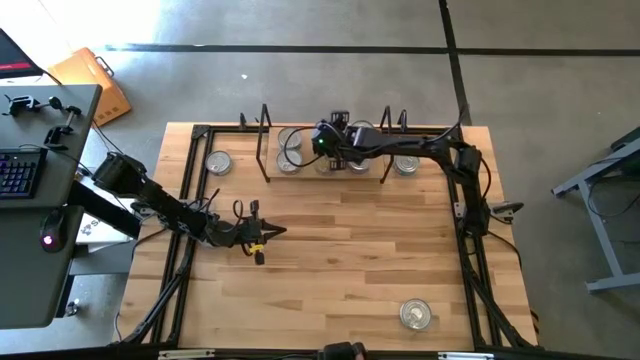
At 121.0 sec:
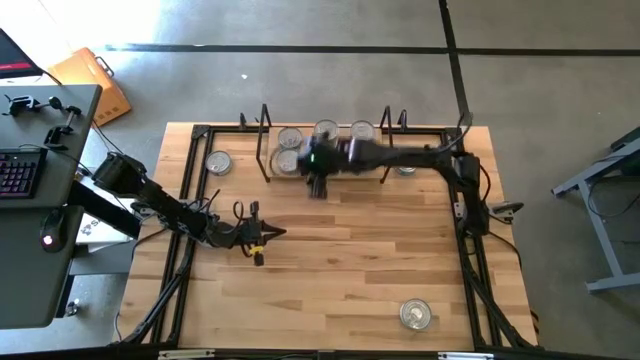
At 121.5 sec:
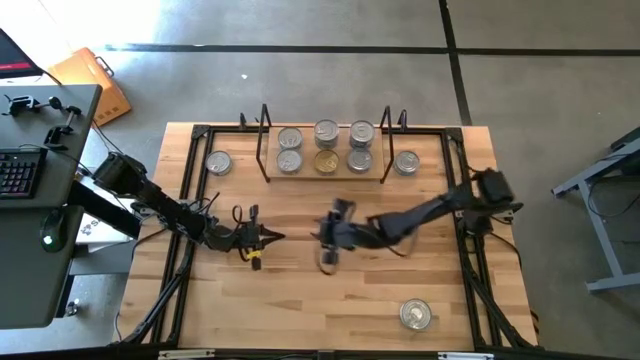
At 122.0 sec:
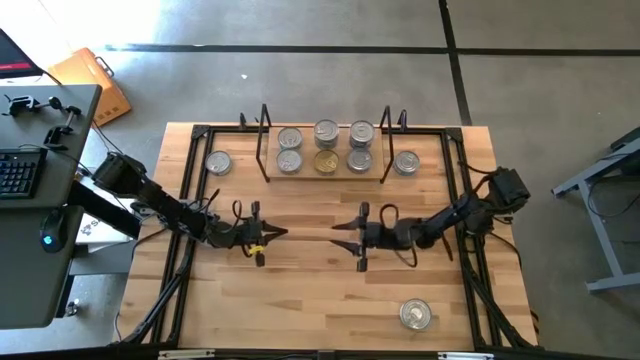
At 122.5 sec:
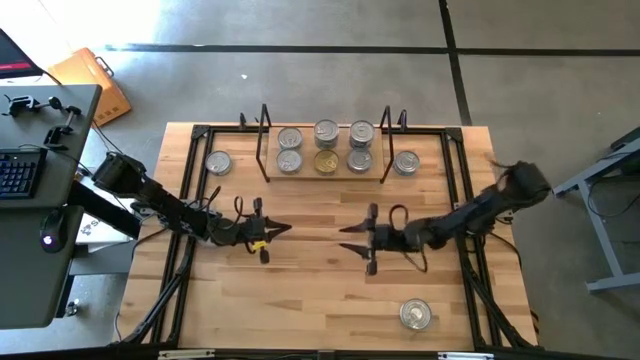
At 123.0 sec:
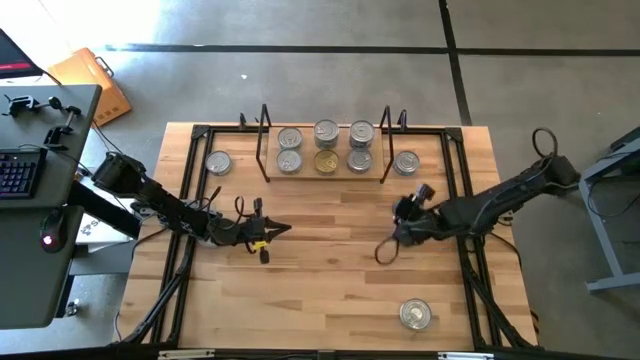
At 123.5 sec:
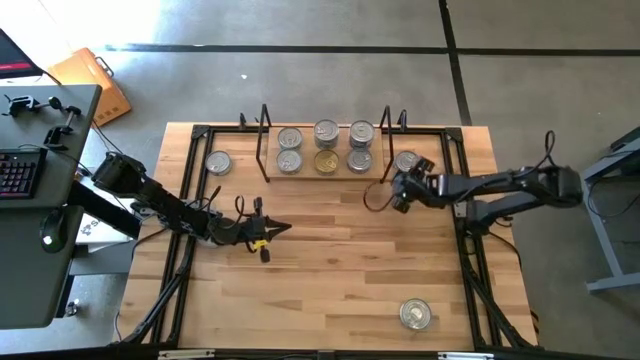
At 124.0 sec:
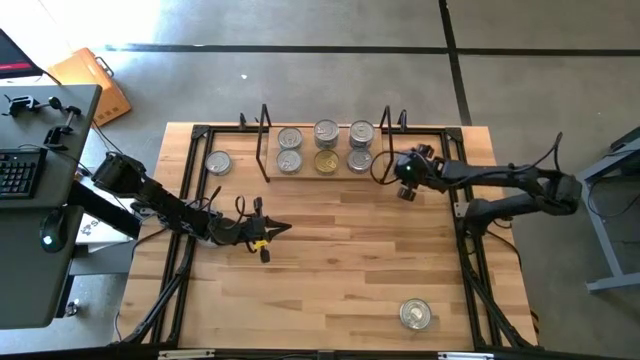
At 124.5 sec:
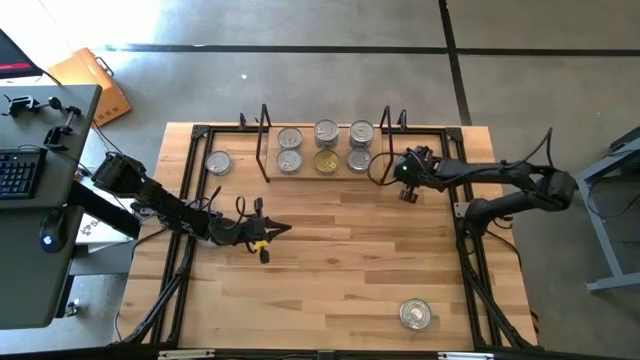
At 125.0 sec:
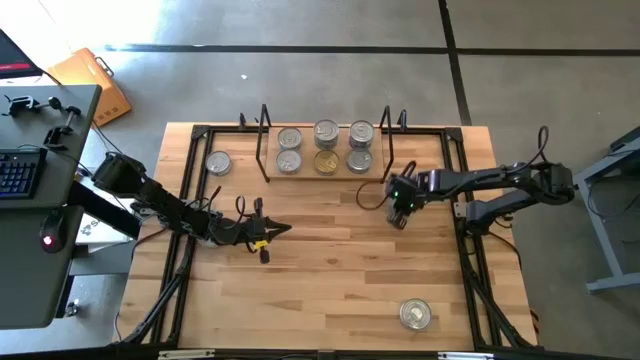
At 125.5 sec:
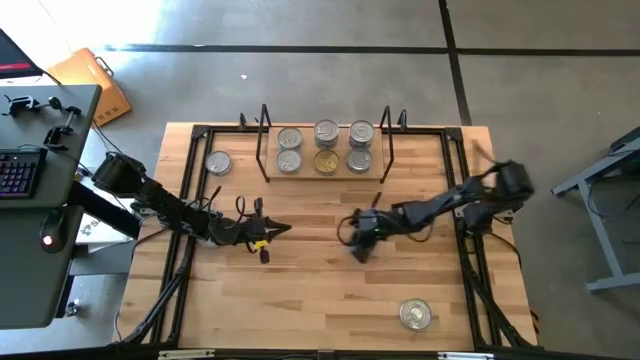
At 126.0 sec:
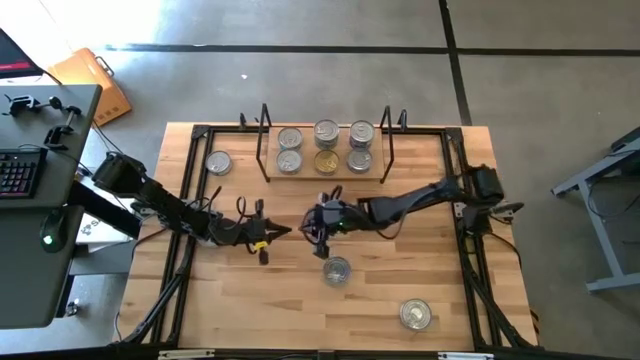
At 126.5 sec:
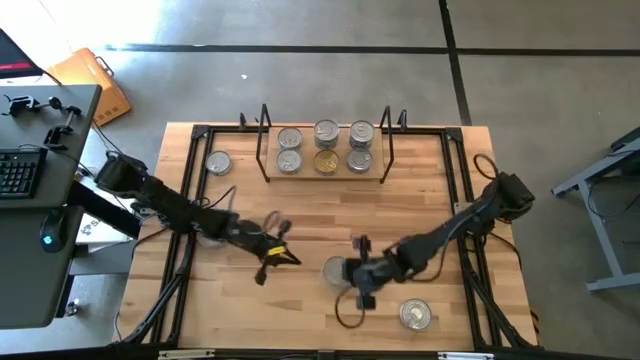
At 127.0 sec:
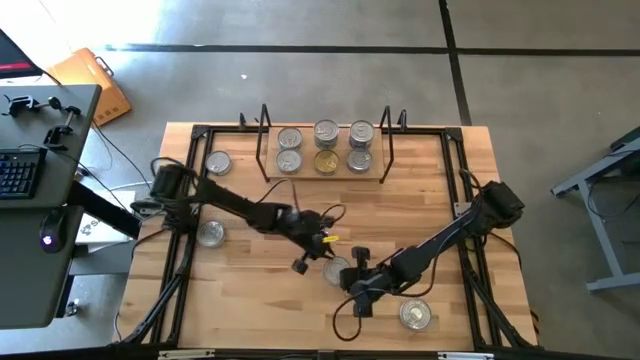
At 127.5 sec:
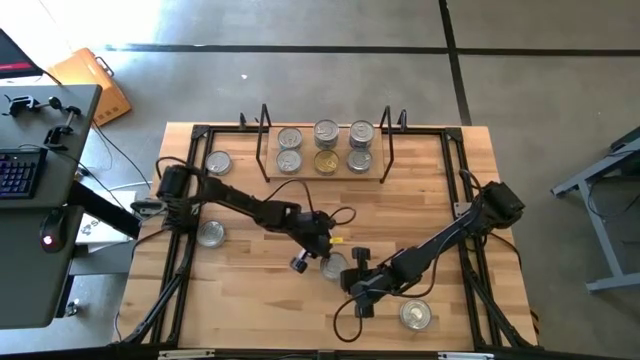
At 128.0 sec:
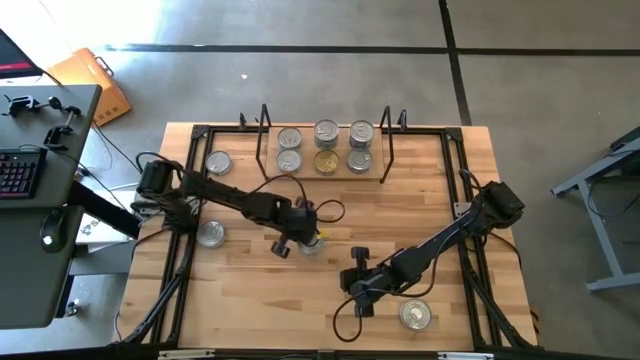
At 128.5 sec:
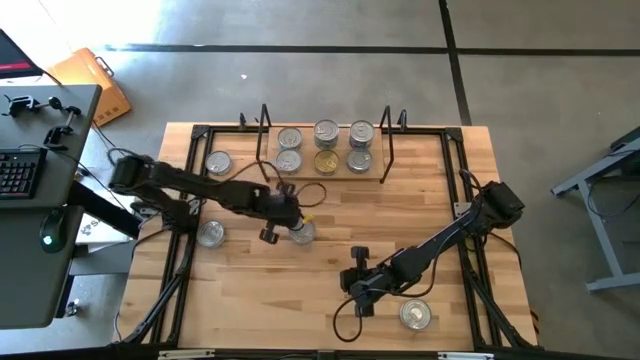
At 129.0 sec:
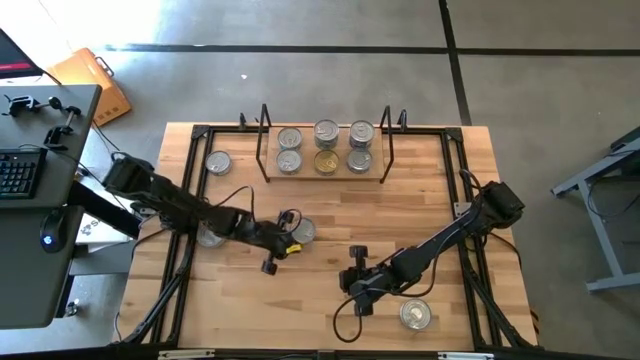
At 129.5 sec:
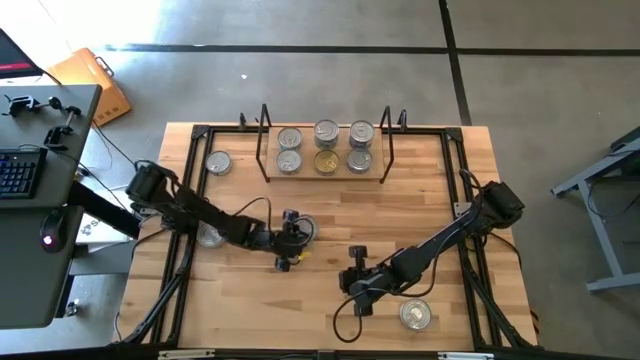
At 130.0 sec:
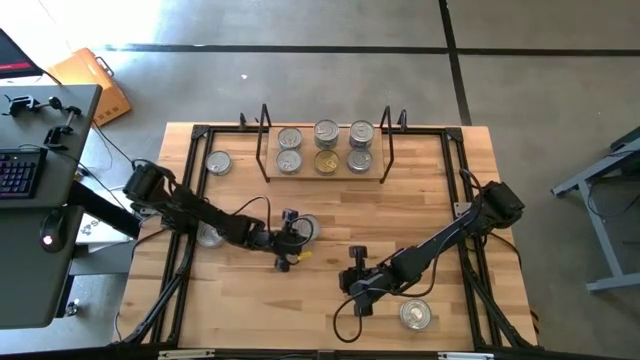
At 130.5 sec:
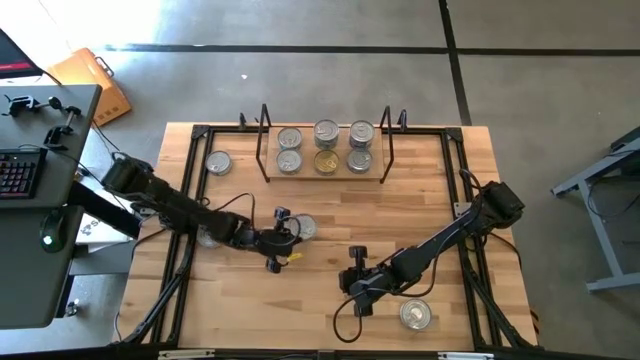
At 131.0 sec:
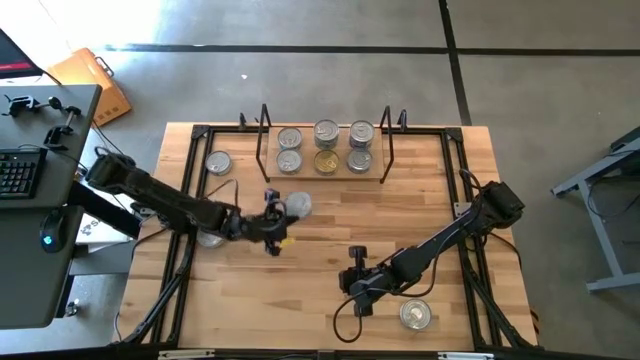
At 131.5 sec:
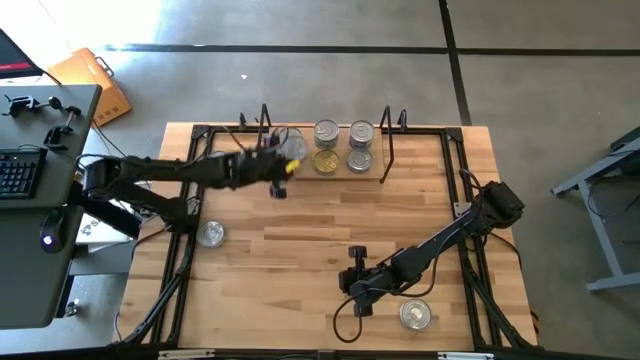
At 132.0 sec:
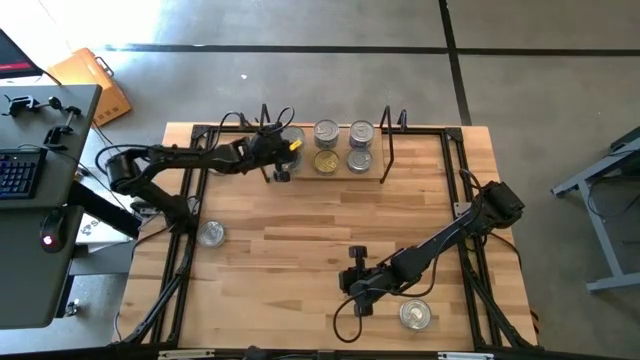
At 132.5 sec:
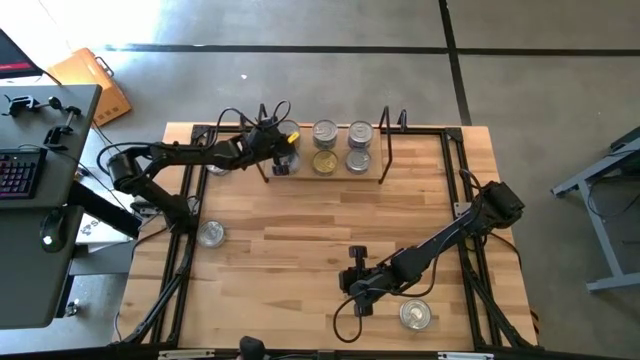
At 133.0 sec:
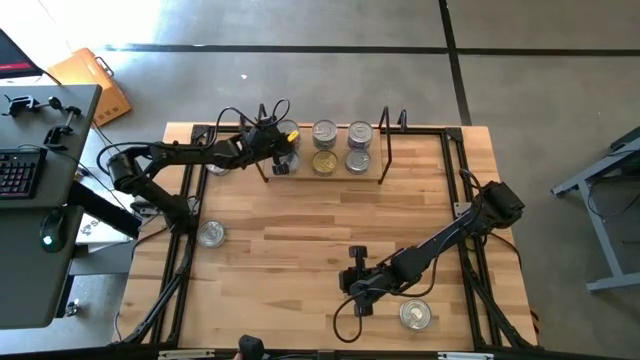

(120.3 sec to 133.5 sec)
Task: Stack canned seafood by type on shelf
Stack the yellow-blue tuna can on top of the yellow-blue tuna can on the shelf

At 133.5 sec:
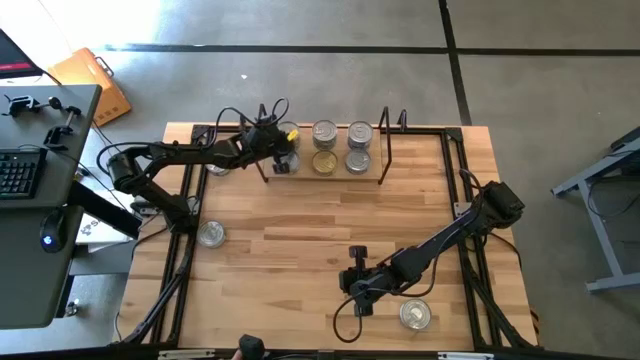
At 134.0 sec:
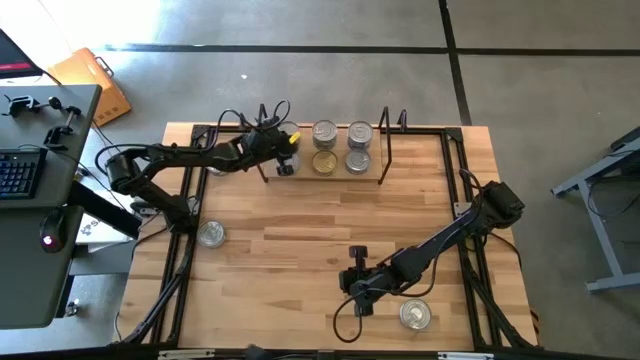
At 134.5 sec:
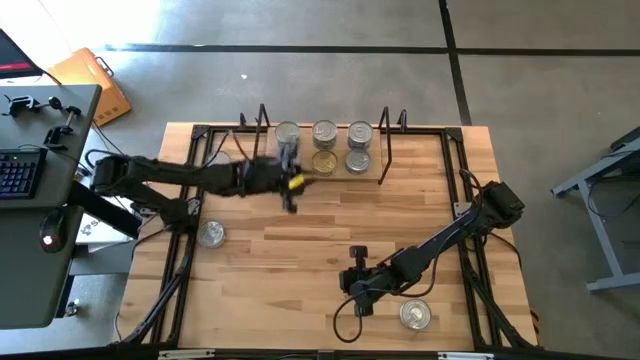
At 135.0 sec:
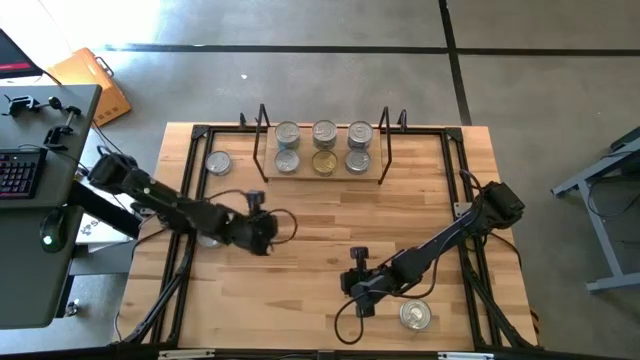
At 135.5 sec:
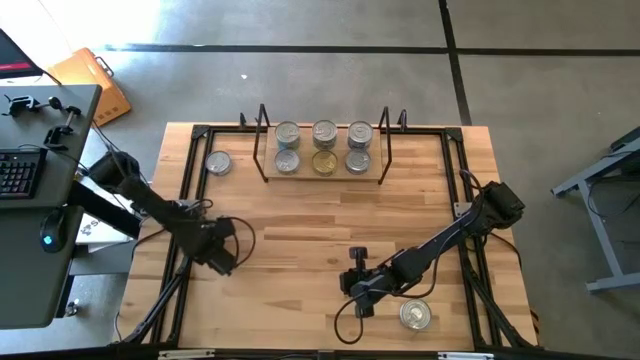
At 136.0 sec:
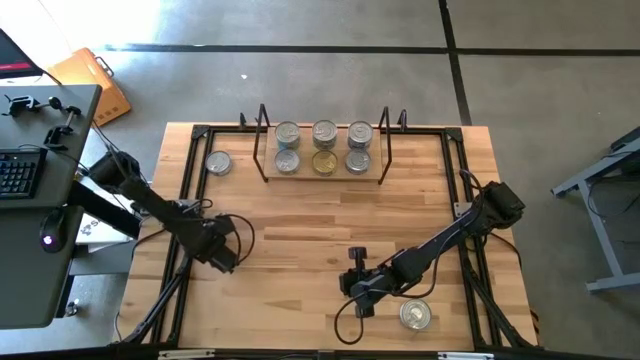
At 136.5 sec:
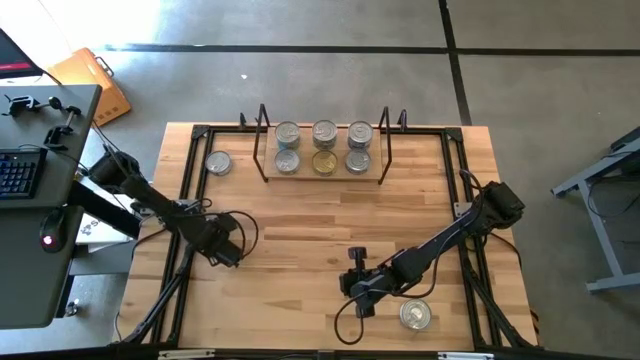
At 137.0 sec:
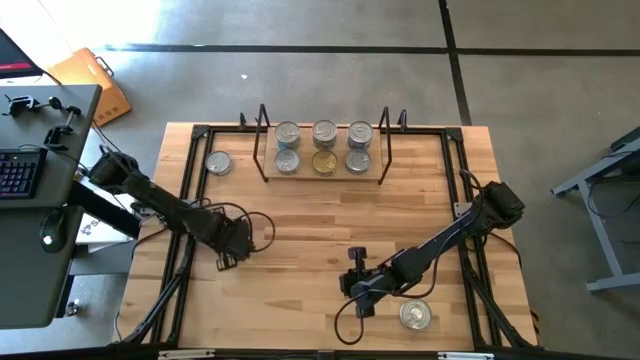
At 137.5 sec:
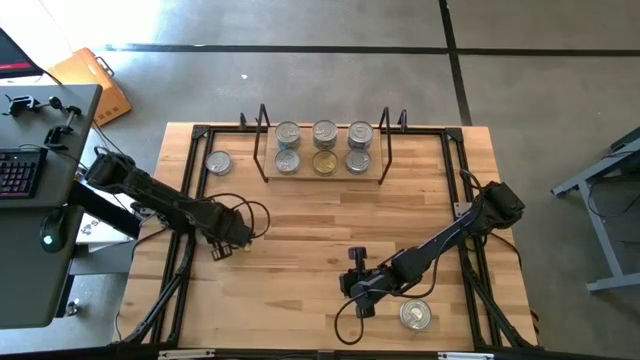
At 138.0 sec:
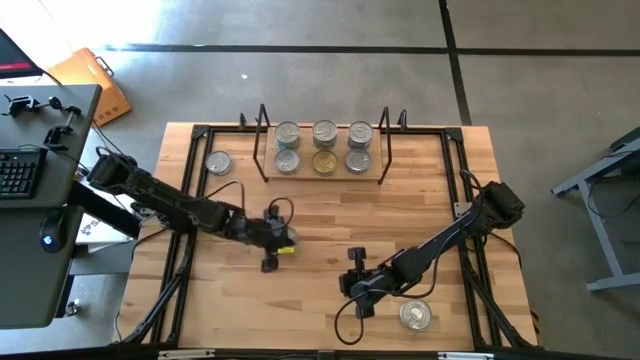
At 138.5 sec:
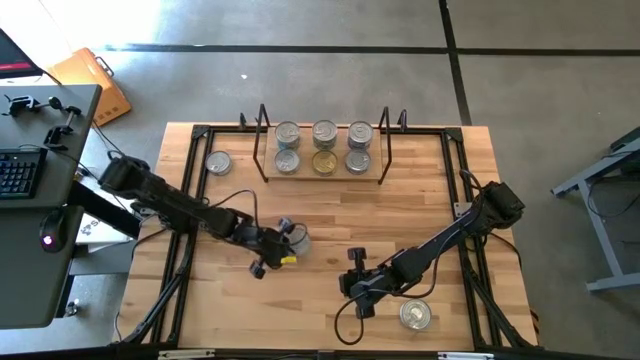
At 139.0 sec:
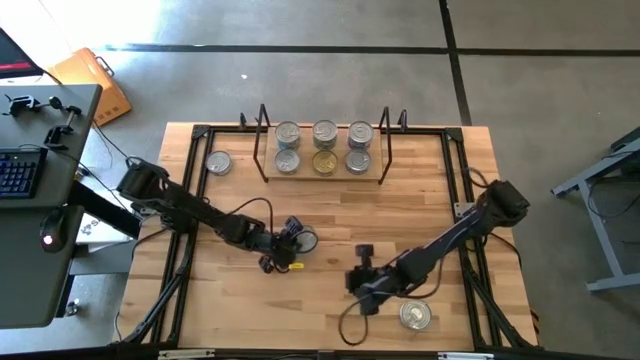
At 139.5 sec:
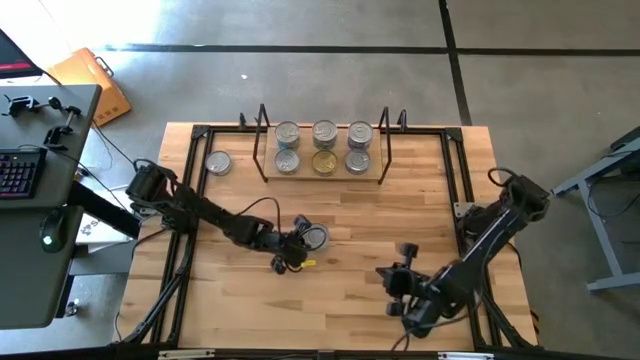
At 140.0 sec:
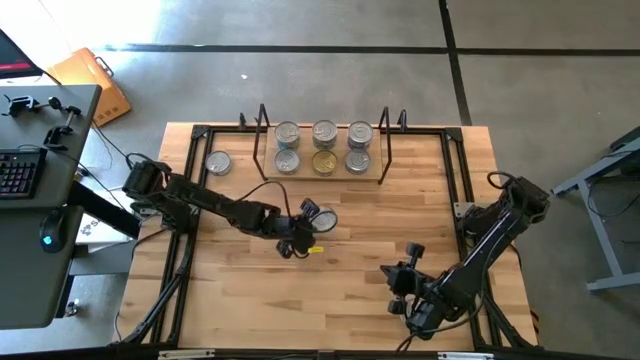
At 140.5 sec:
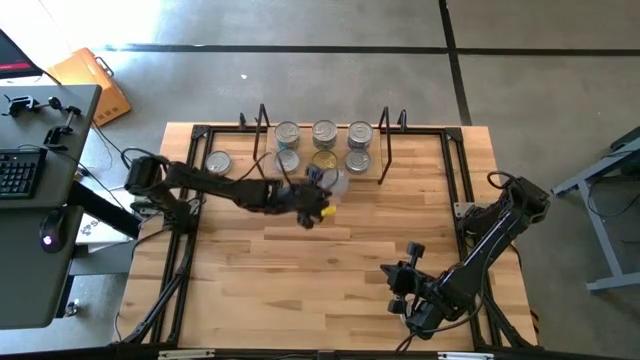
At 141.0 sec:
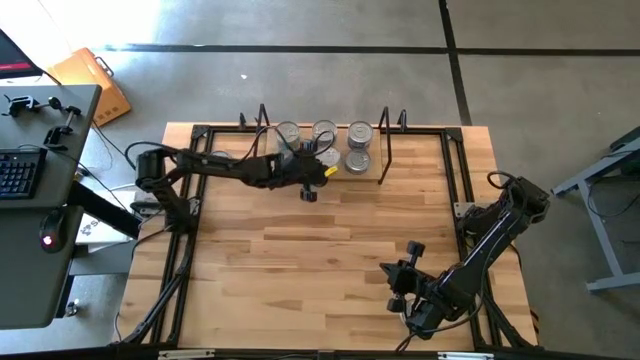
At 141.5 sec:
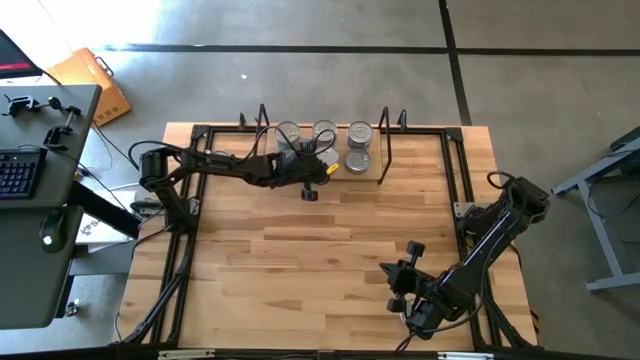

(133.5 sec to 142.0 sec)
Stack the green tuna can on top of the green tuna can on the shelf
